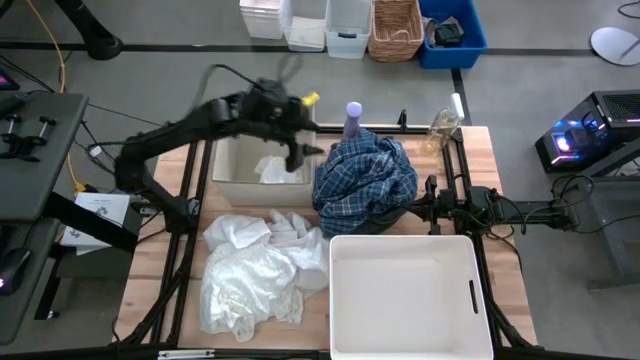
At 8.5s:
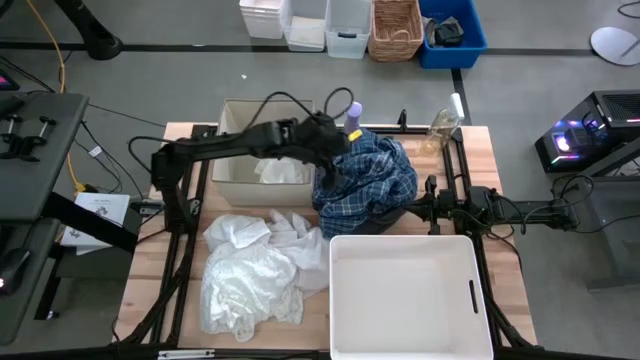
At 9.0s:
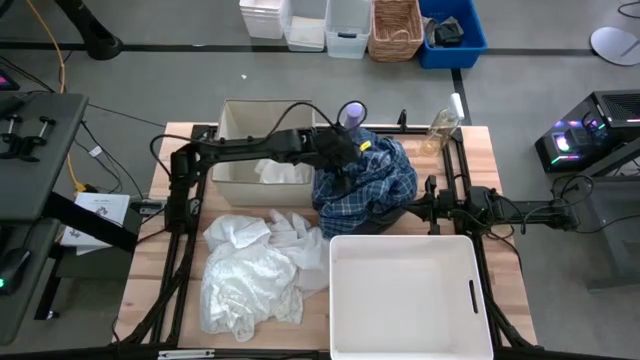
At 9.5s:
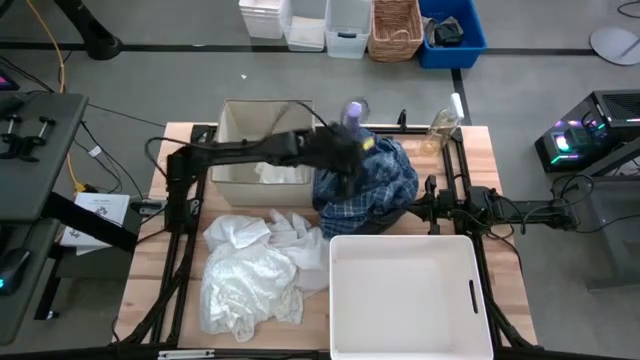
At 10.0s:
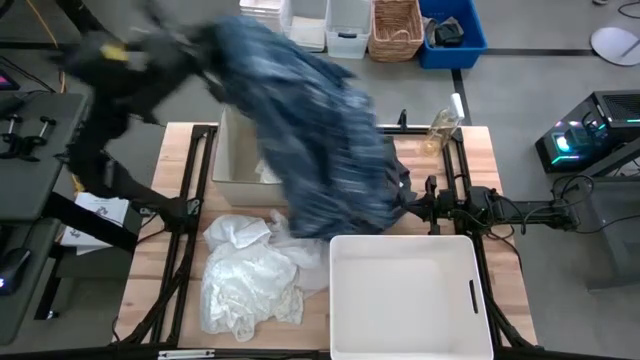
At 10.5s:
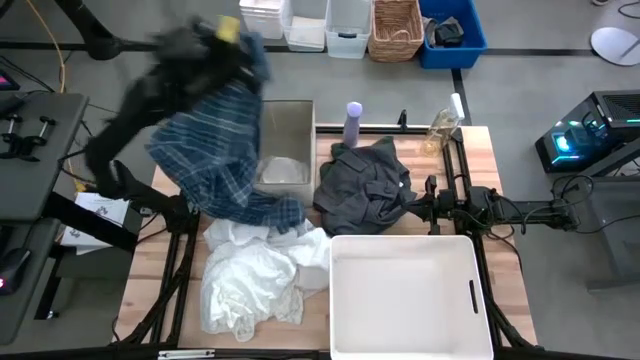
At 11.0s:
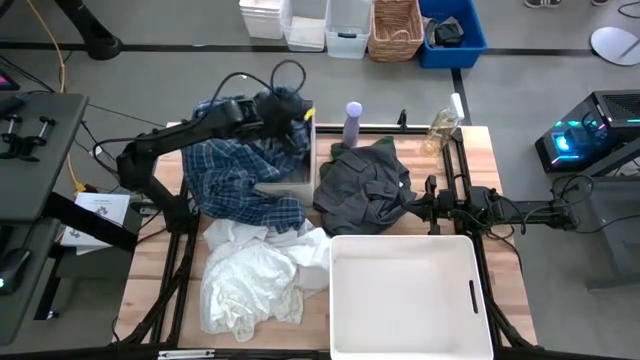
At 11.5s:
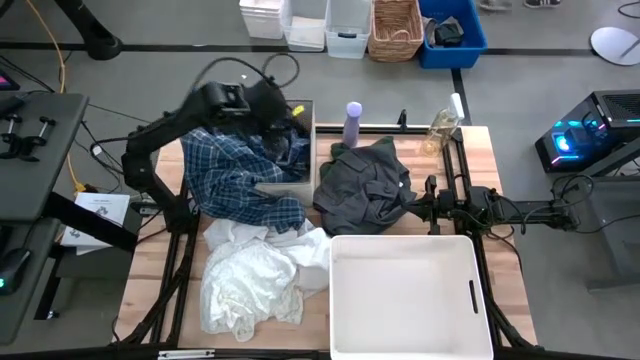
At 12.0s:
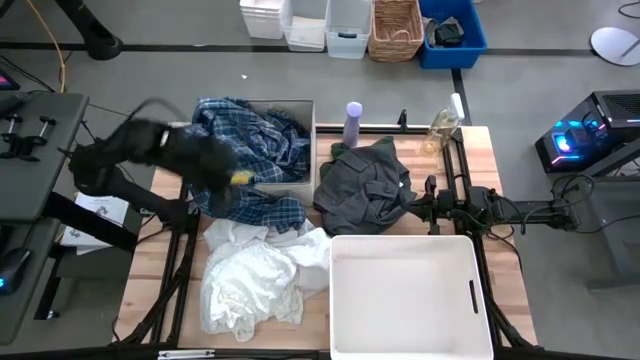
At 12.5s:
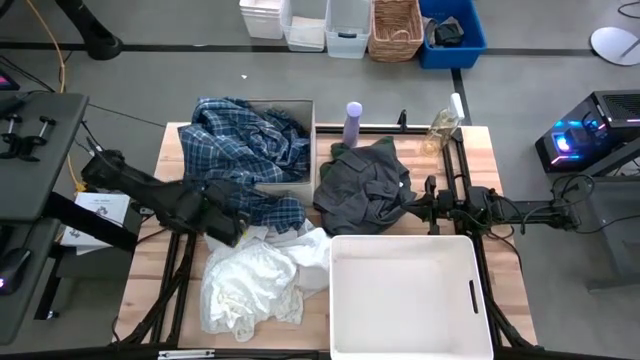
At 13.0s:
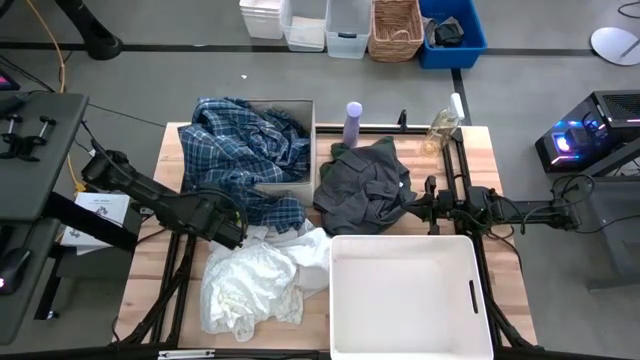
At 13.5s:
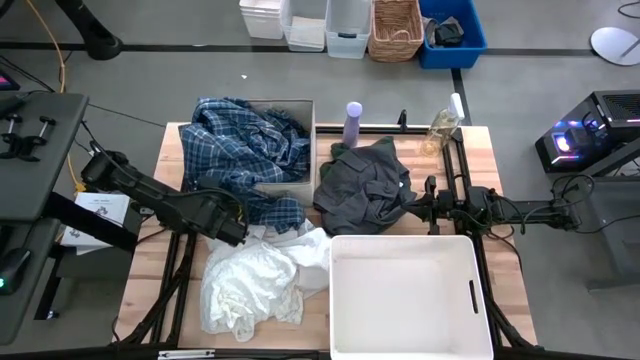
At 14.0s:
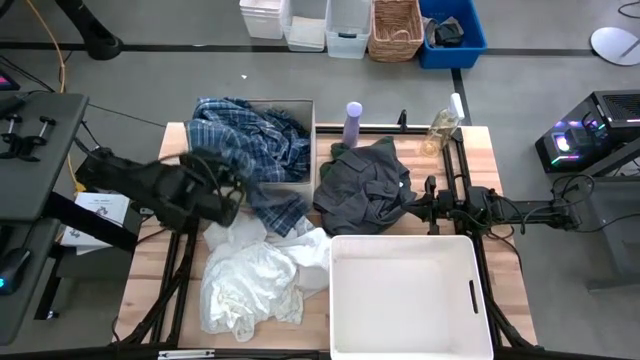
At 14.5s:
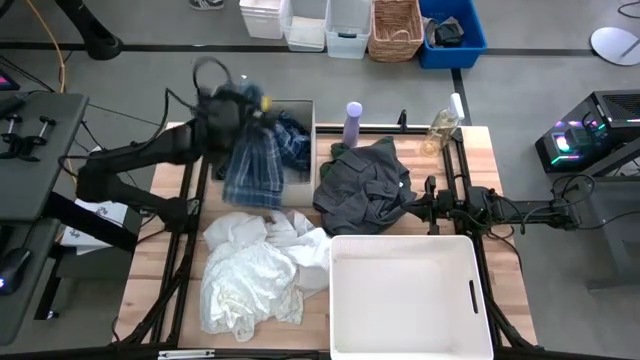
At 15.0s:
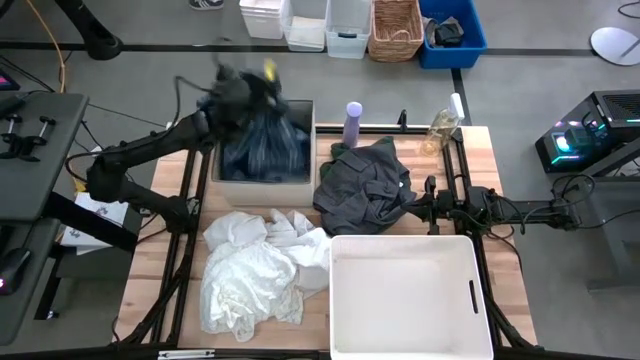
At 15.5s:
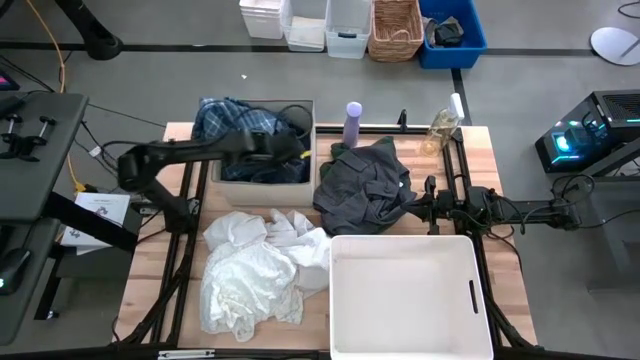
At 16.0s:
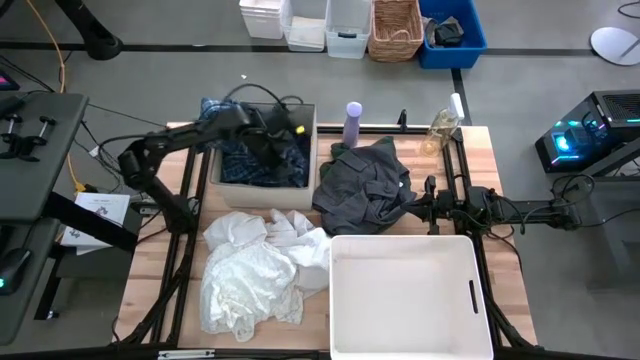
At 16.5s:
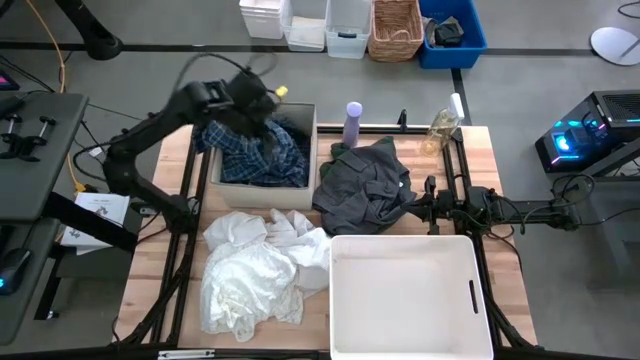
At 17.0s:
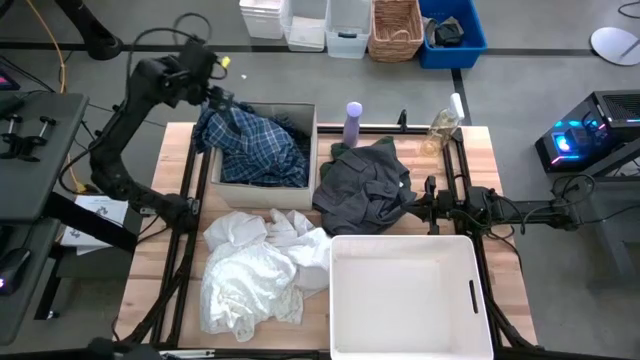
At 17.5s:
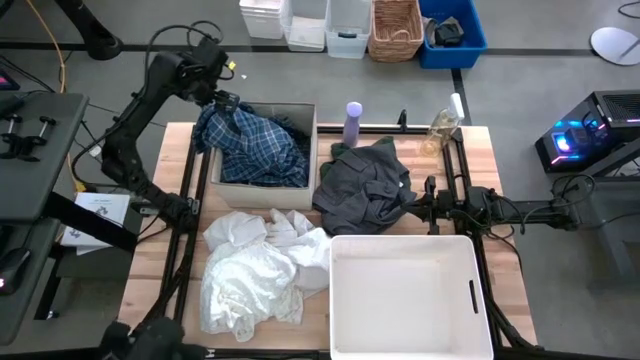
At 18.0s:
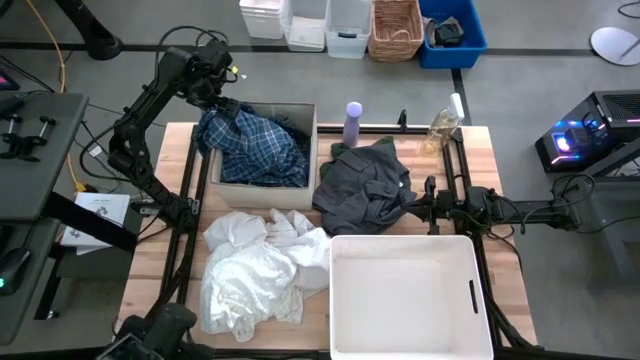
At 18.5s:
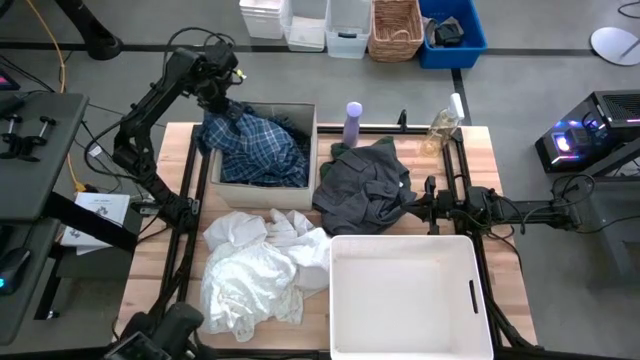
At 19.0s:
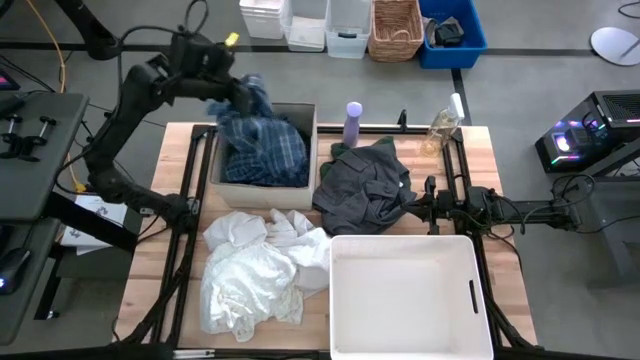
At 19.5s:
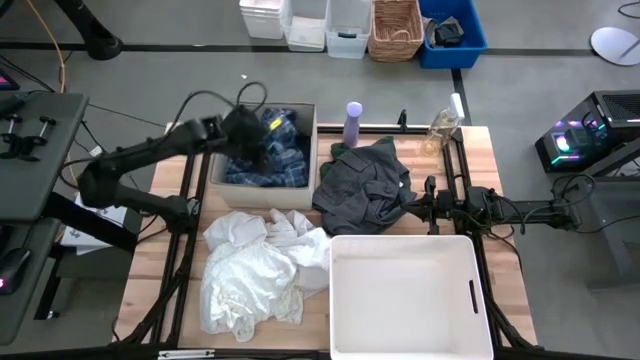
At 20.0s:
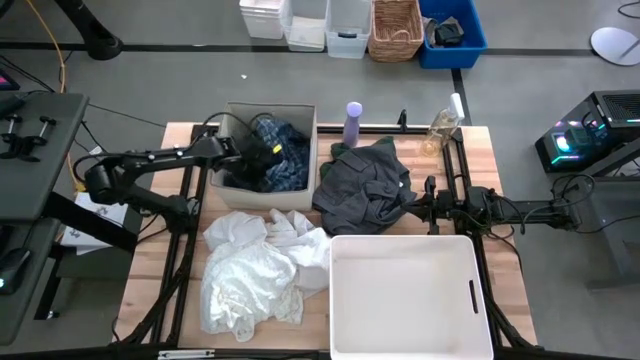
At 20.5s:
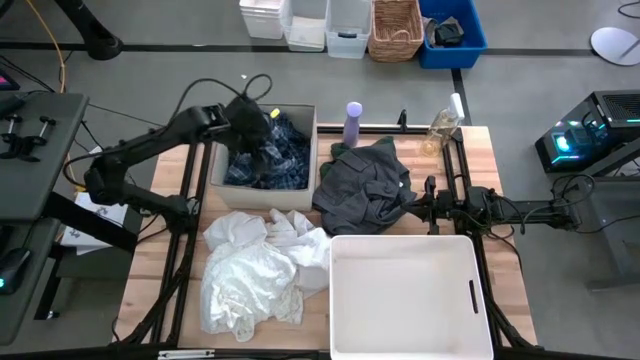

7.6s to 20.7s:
Task: Sort clothes
Put the blue long sleeve into the gray bin

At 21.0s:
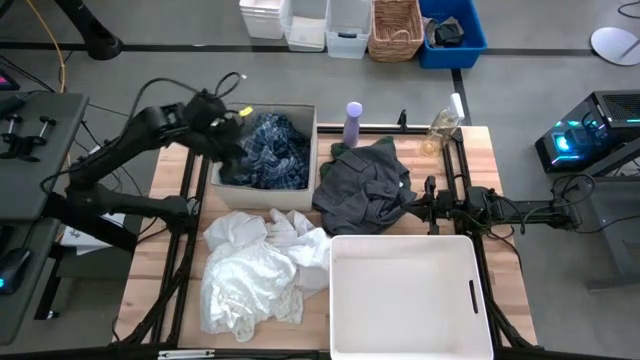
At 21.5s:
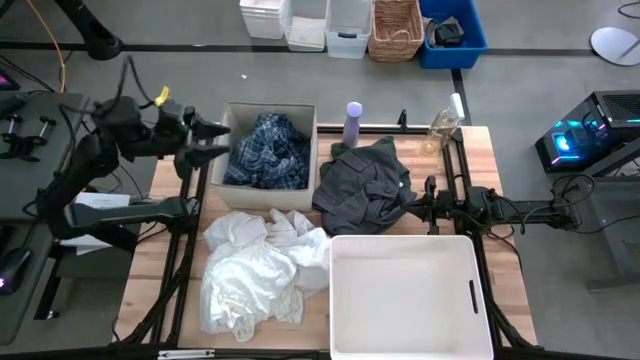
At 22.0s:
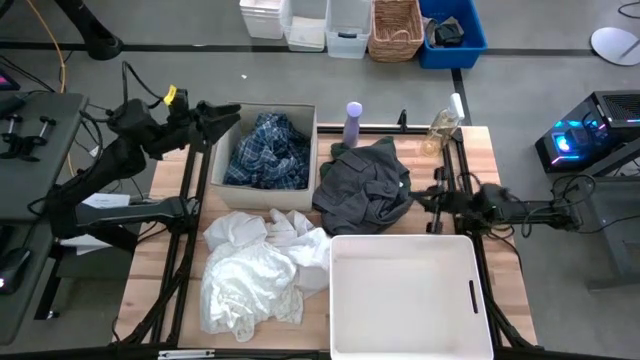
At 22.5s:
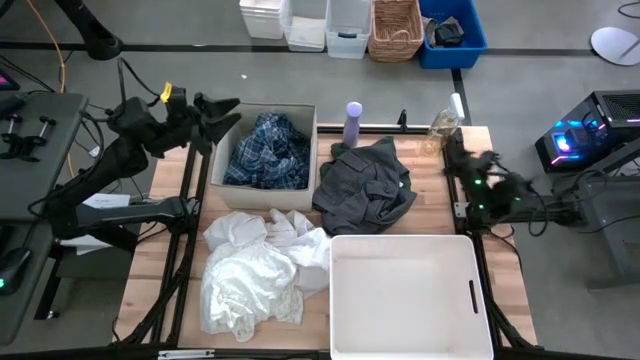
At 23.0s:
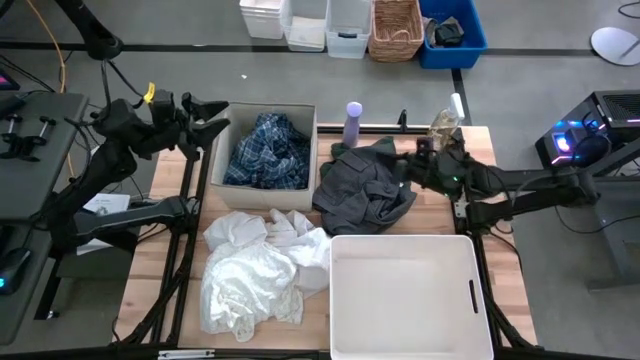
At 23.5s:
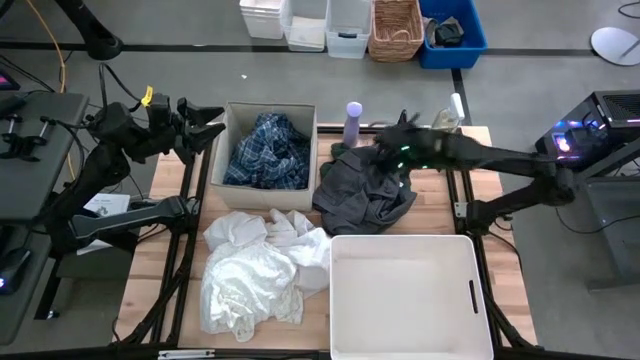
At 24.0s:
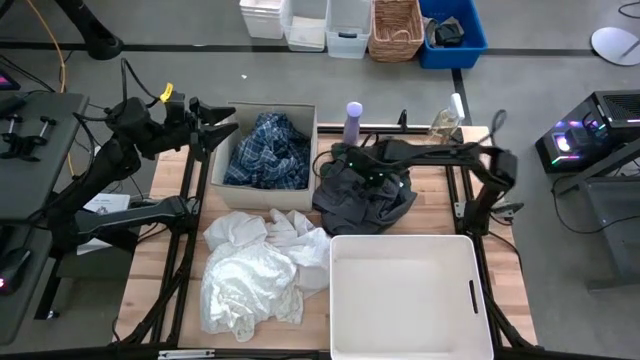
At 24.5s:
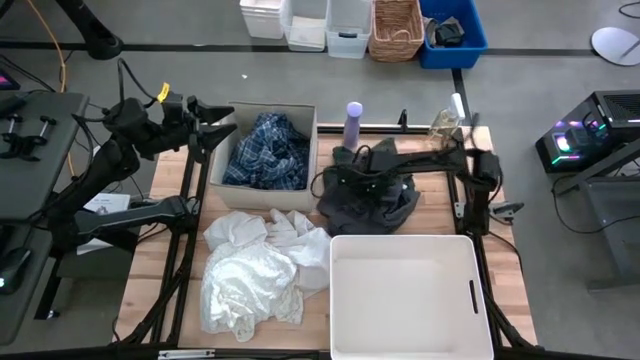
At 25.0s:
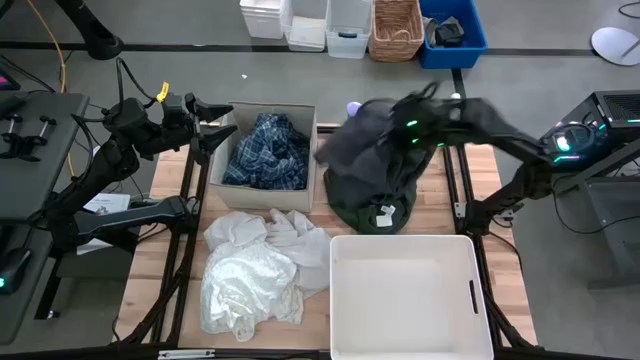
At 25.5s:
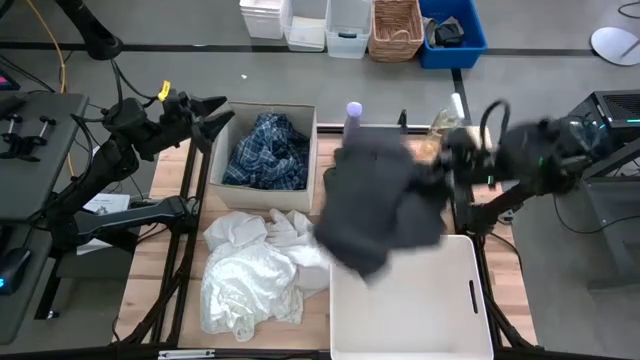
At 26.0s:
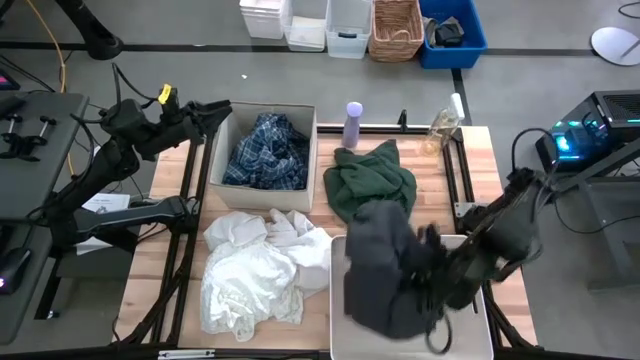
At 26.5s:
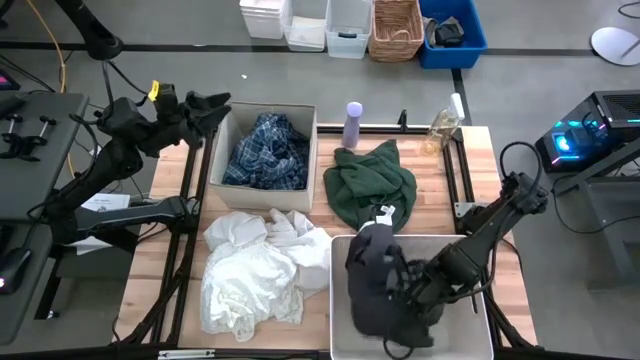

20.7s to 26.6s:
Put the gray long pants into the gray bin
